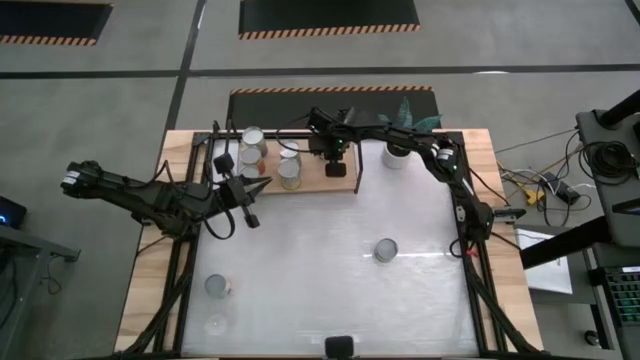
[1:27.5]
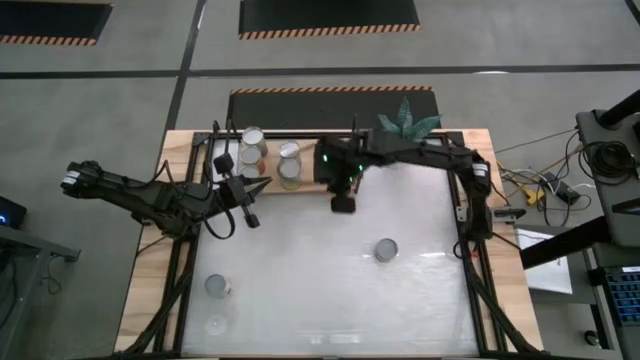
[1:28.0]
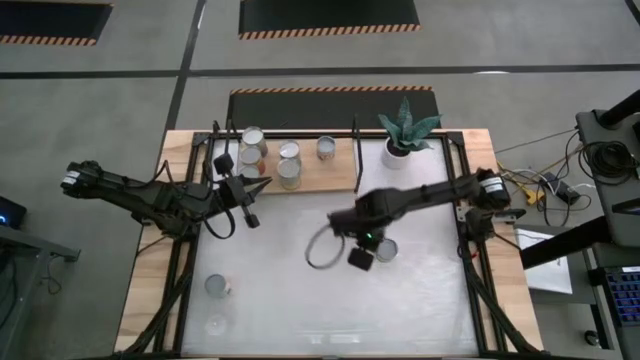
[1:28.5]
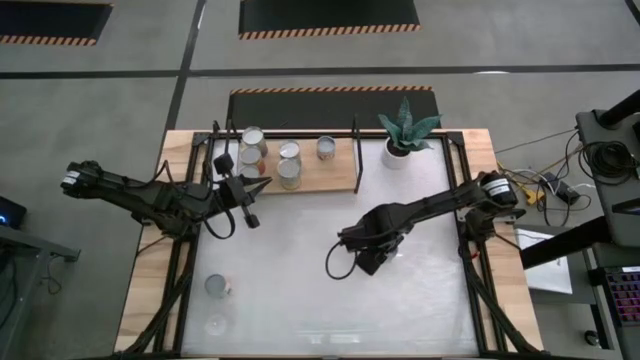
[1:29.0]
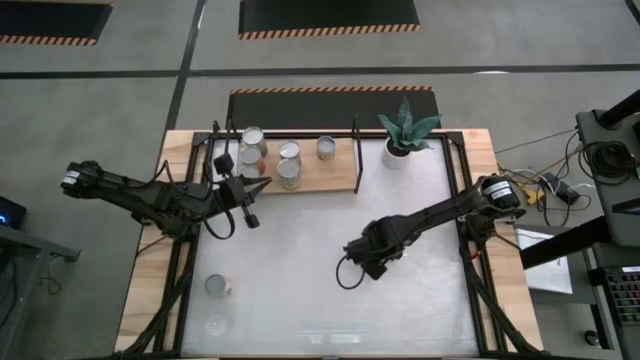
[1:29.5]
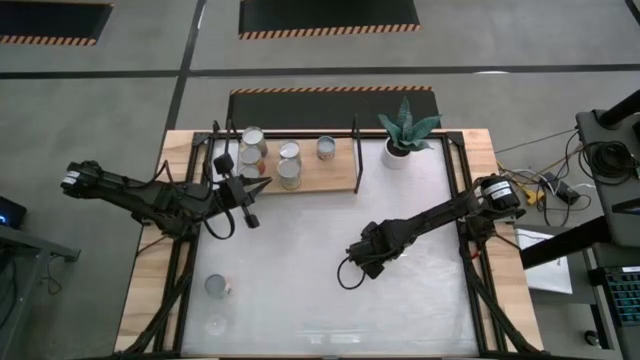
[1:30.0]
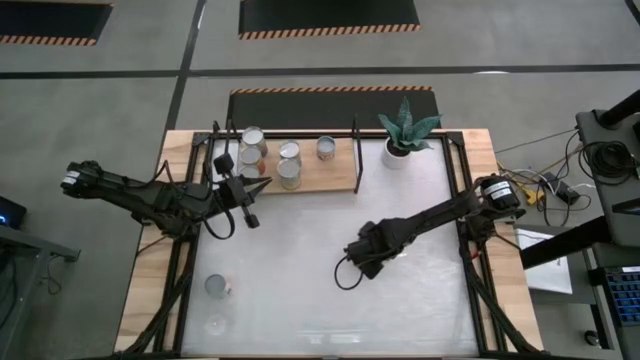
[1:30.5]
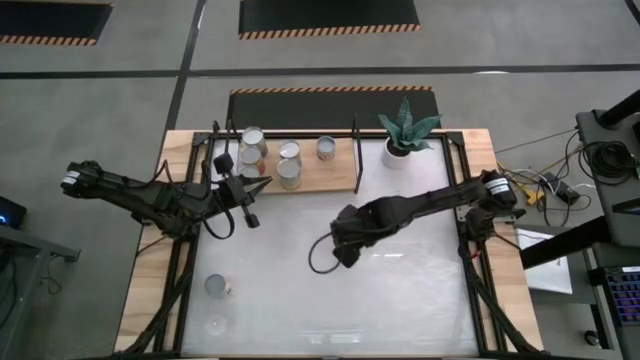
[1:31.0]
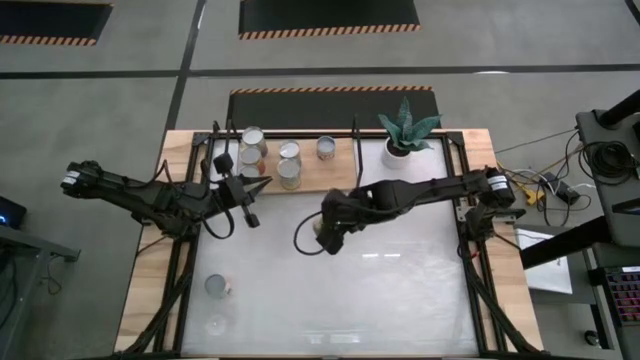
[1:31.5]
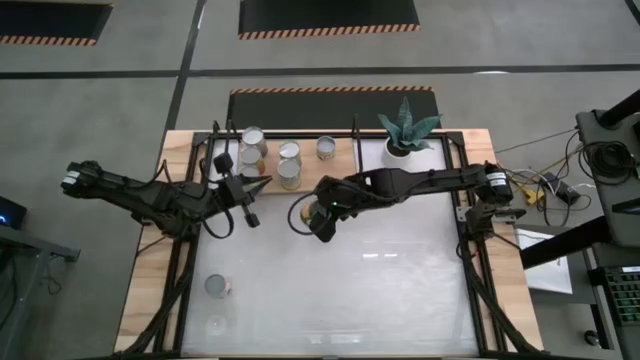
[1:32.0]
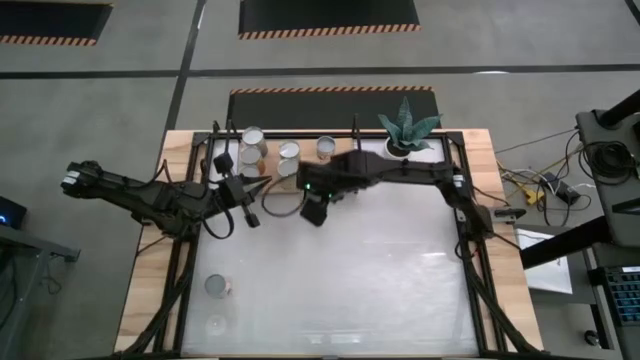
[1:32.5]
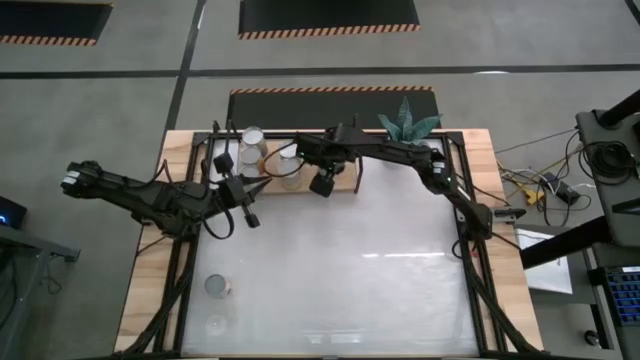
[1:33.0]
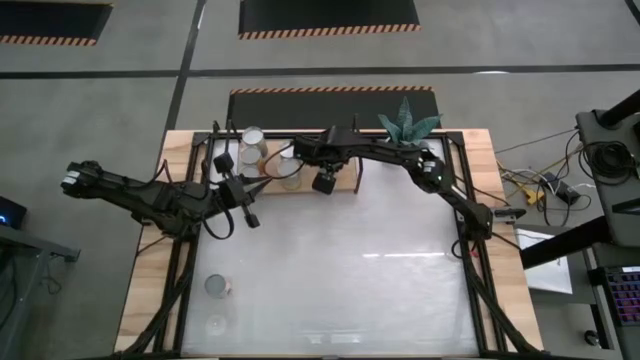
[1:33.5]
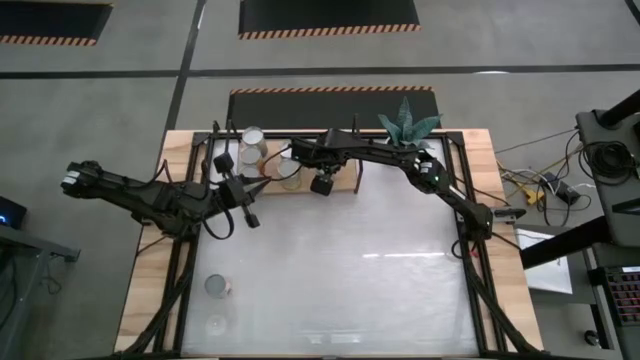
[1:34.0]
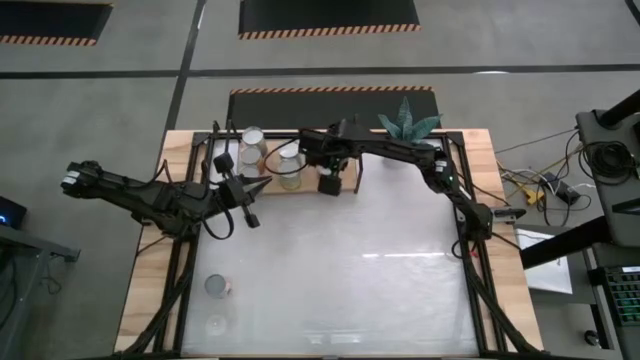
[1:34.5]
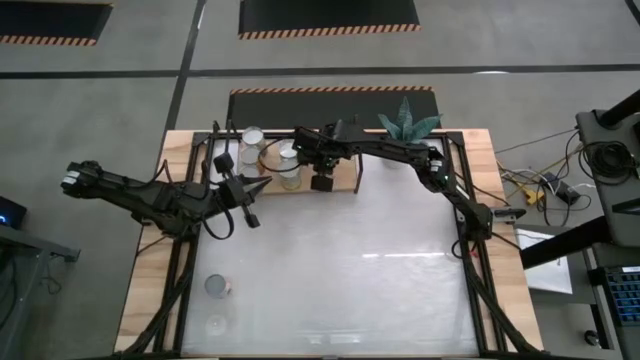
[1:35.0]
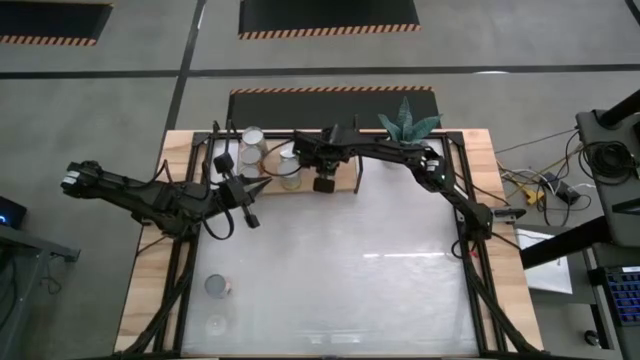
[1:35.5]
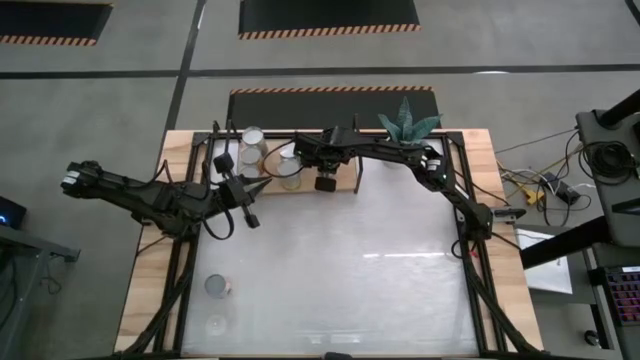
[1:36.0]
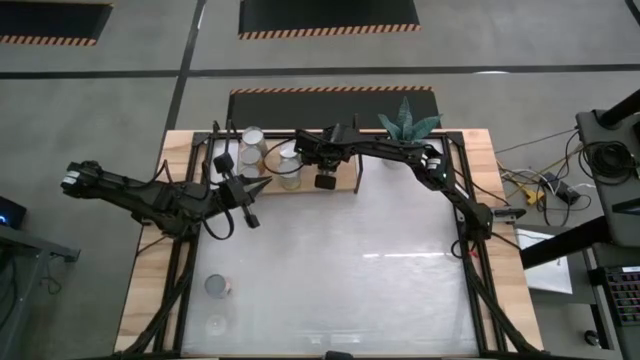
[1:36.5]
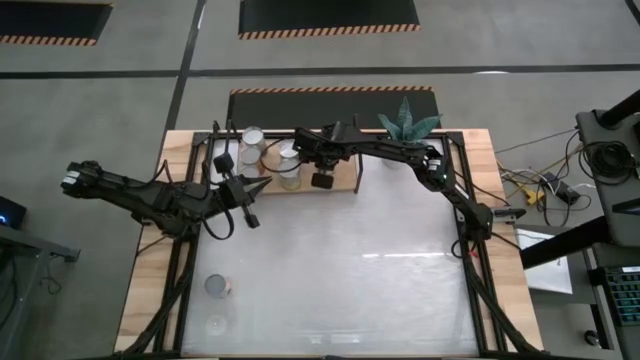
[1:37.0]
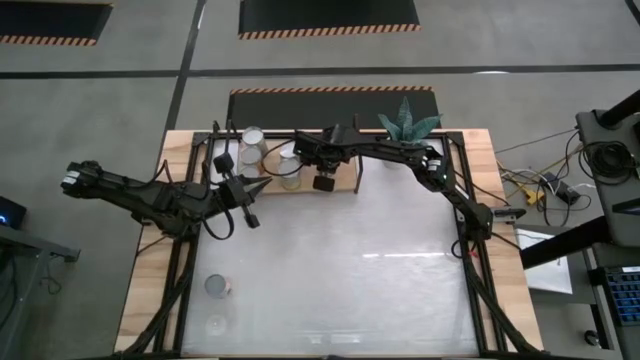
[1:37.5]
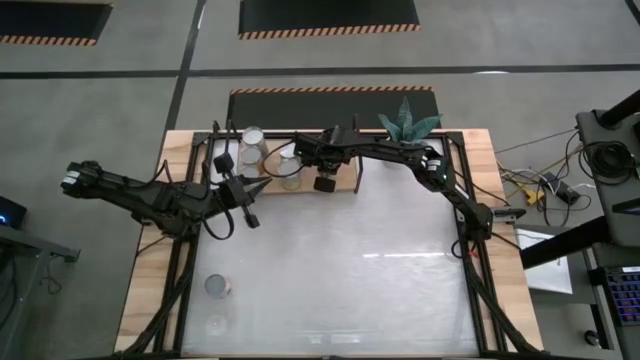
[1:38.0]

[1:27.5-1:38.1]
Task: Pick and place cans onto a shelf
Put the canned peaches on the shelf

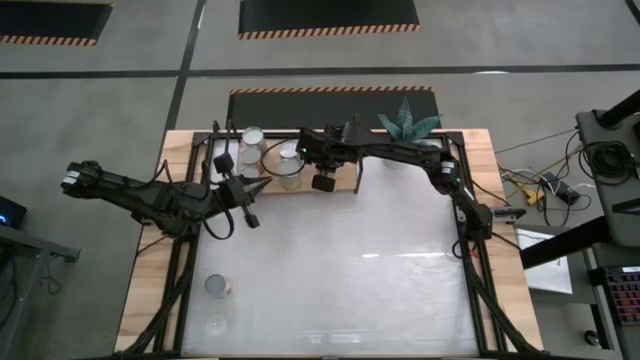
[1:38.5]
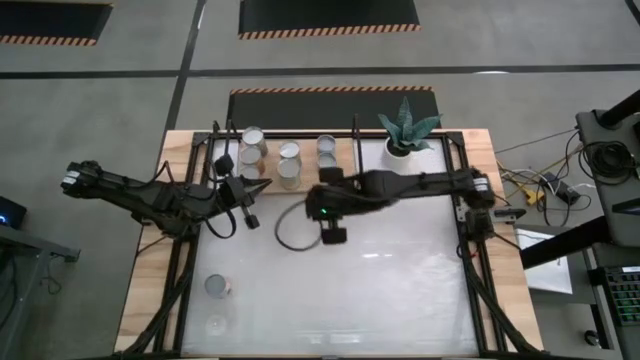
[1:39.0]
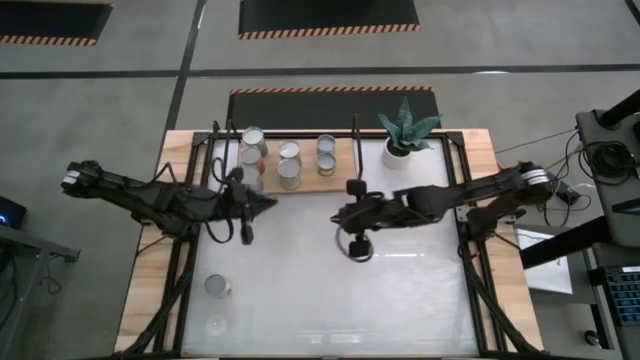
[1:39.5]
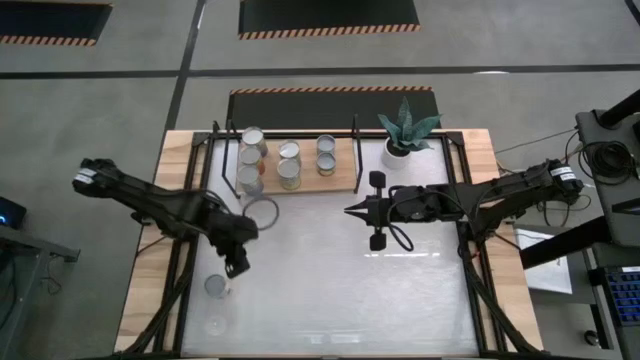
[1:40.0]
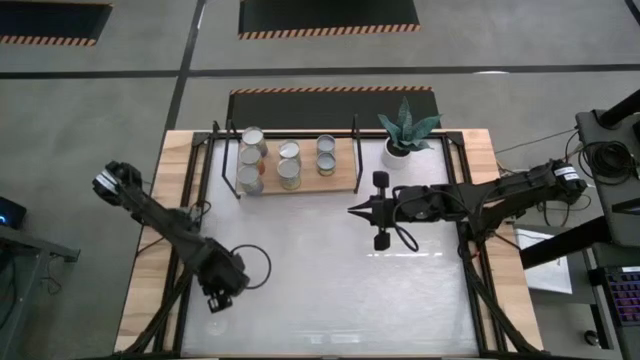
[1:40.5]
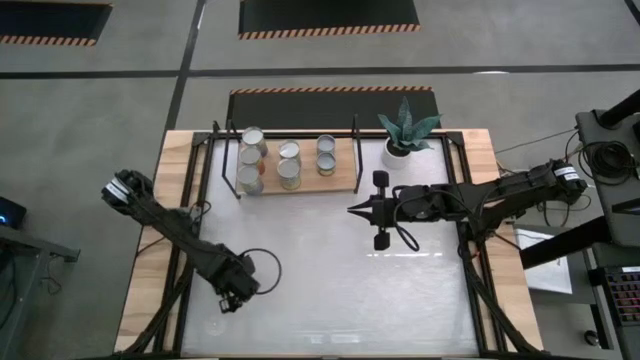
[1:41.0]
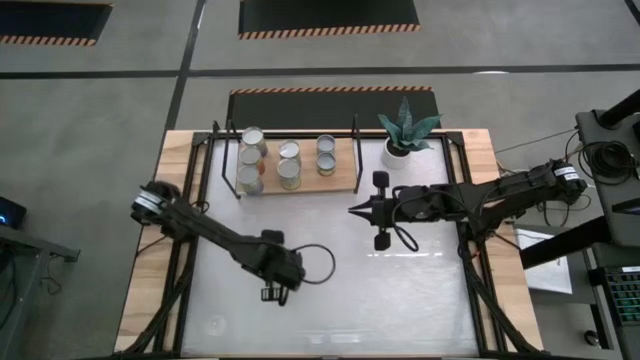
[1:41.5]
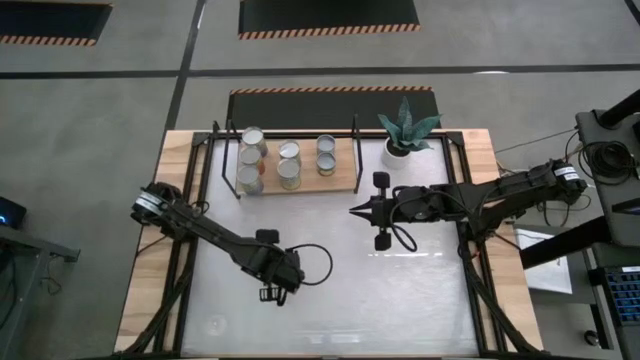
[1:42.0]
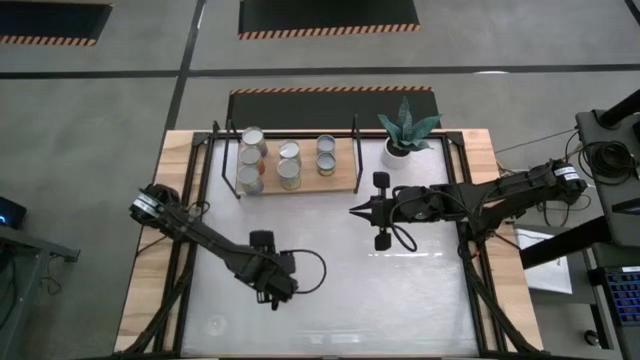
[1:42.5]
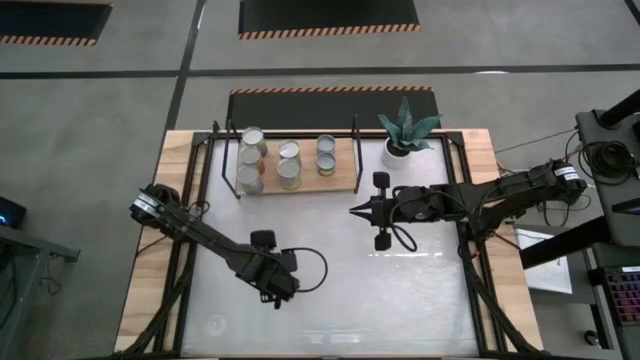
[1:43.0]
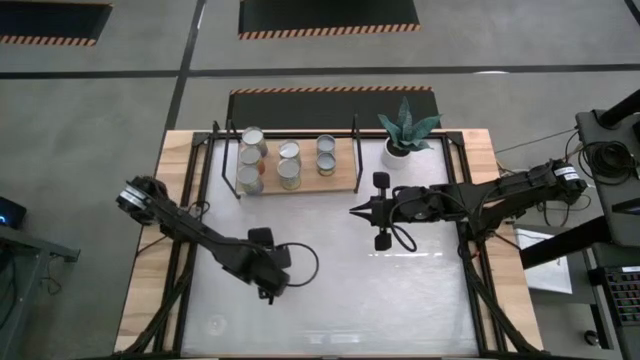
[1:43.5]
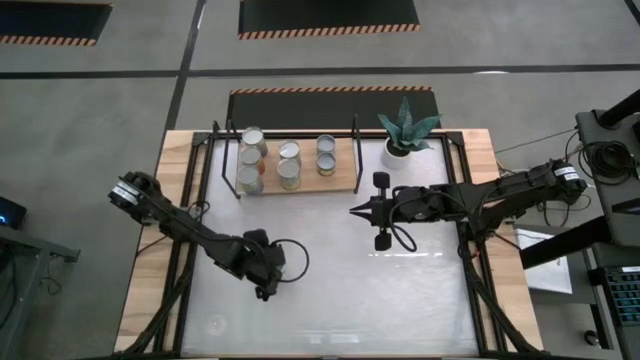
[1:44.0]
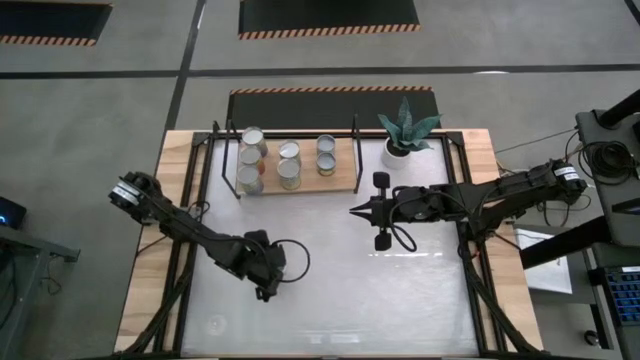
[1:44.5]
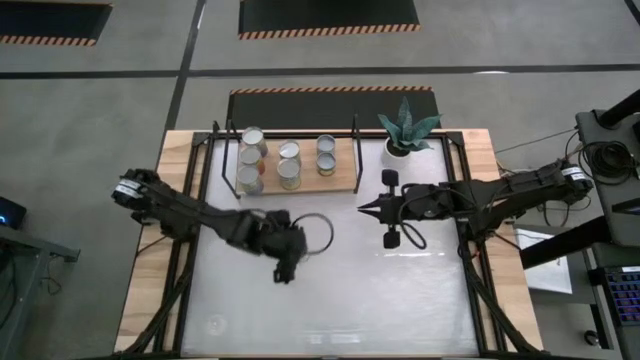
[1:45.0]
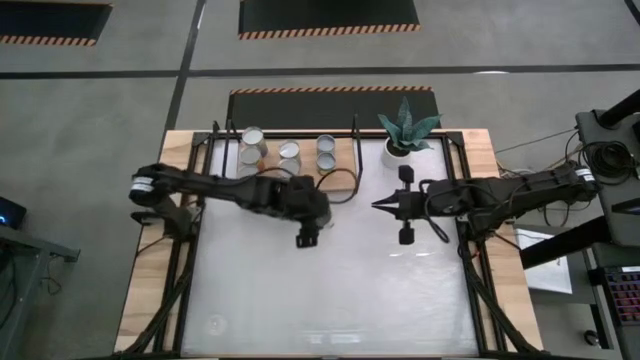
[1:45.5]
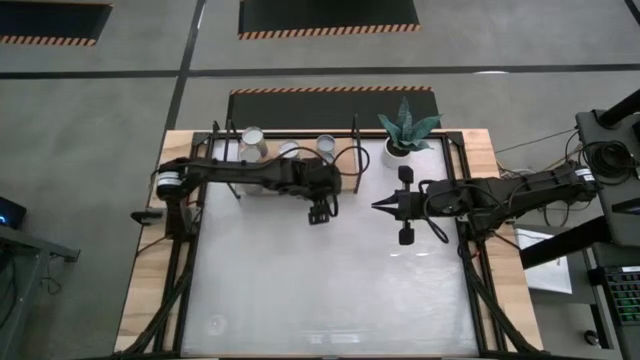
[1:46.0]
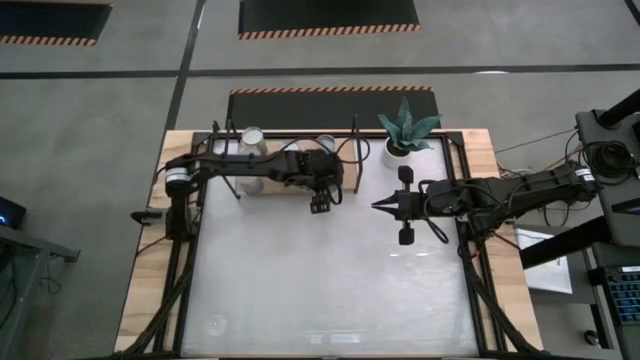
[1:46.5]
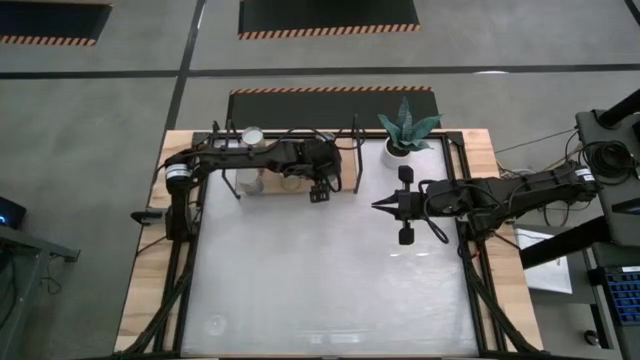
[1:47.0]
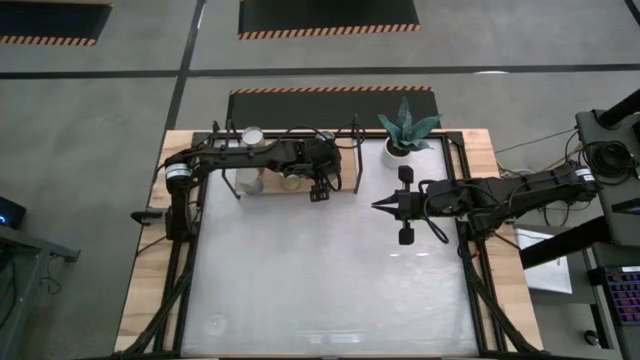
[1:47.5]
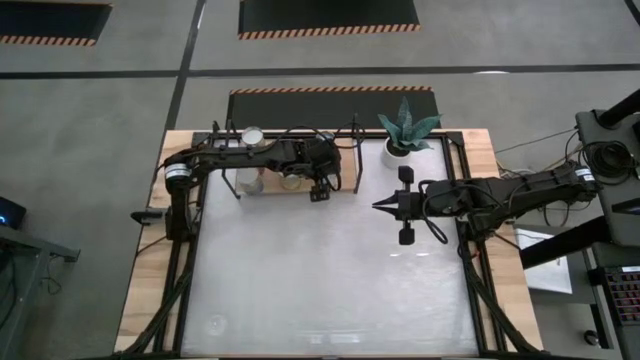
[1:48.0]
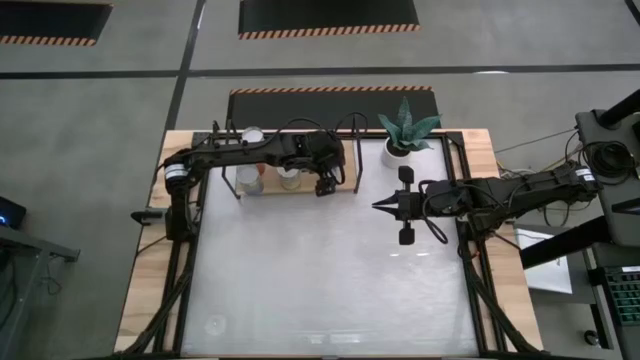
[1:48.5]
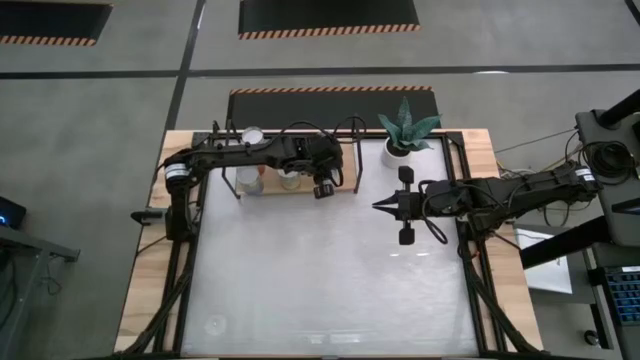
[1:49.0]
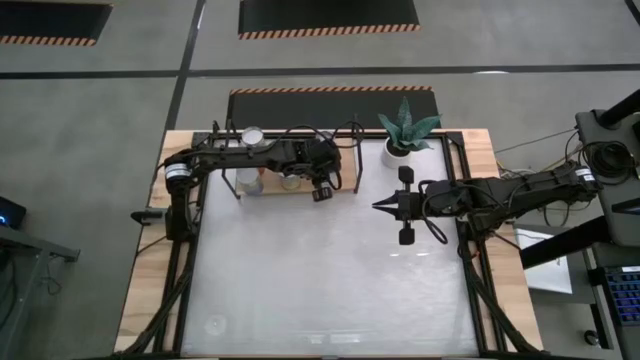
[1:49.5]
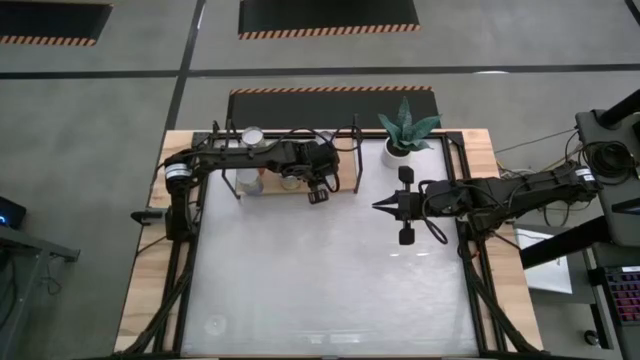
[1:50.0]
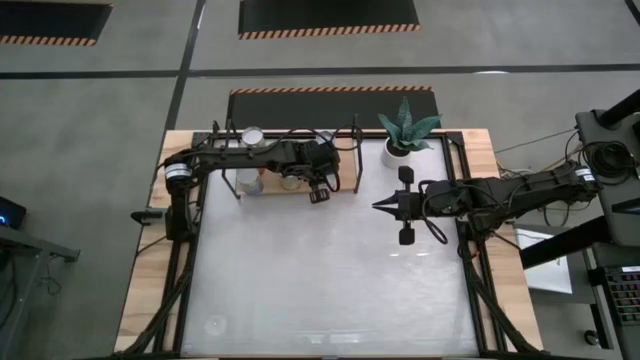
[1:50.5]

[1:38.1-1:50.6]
Put the canned meatballs on the shelf
